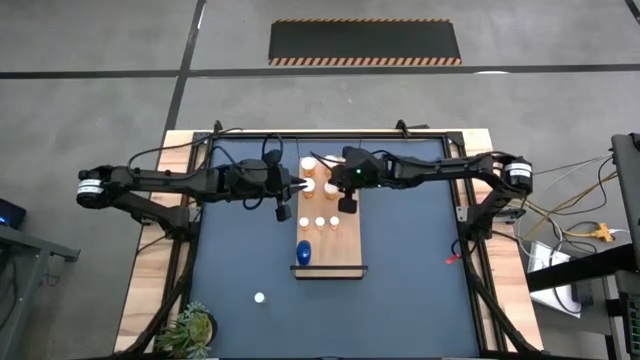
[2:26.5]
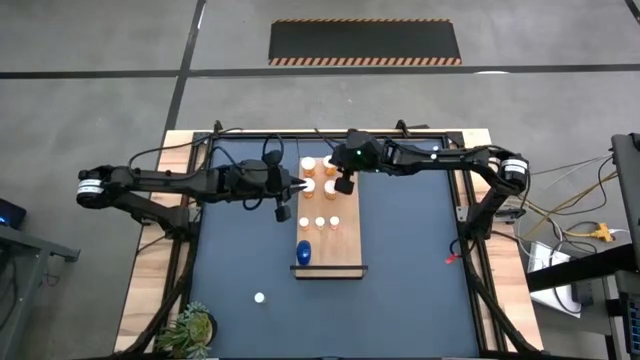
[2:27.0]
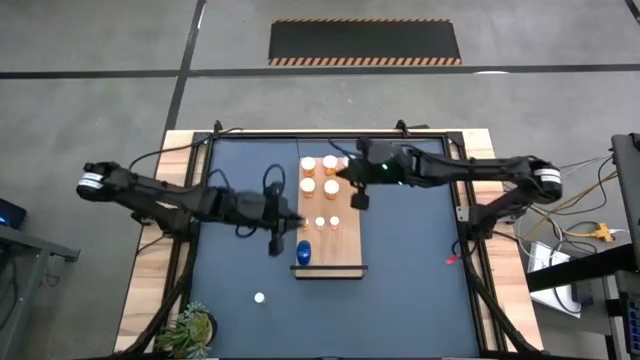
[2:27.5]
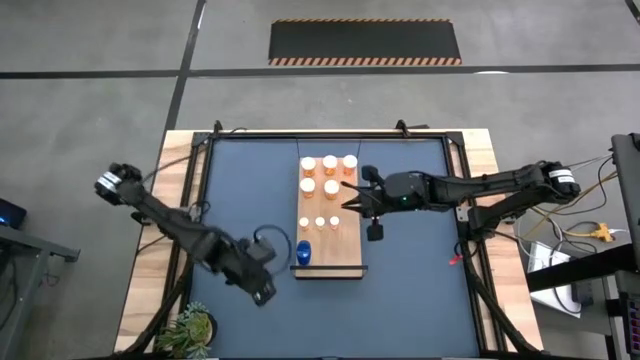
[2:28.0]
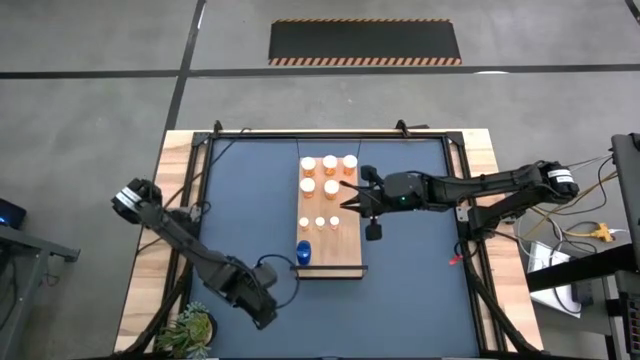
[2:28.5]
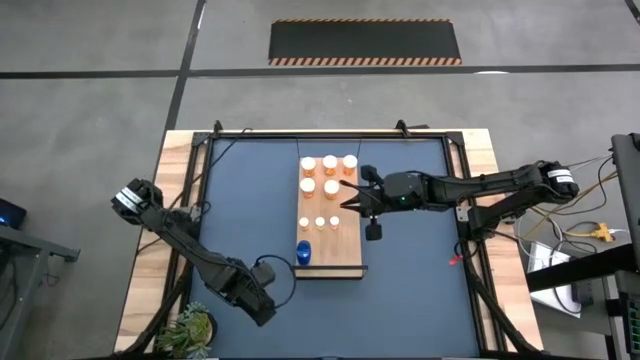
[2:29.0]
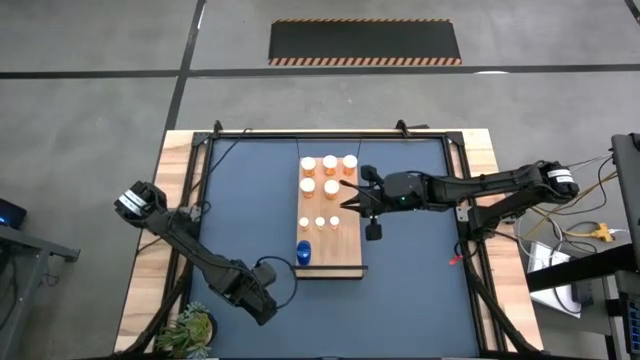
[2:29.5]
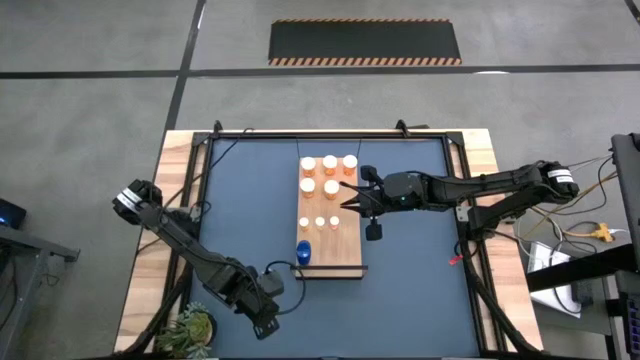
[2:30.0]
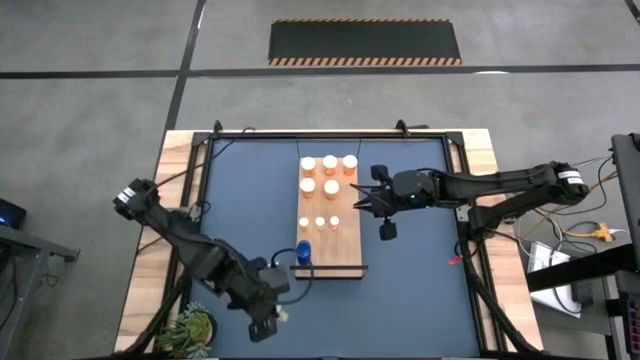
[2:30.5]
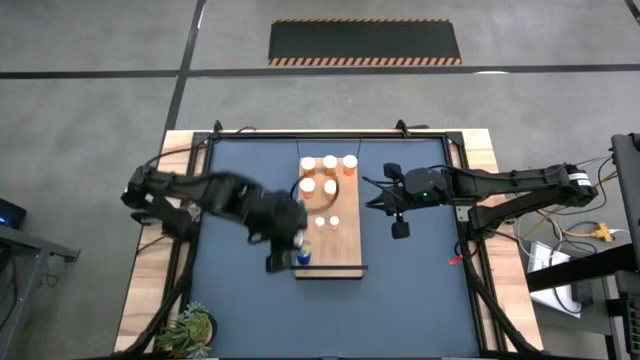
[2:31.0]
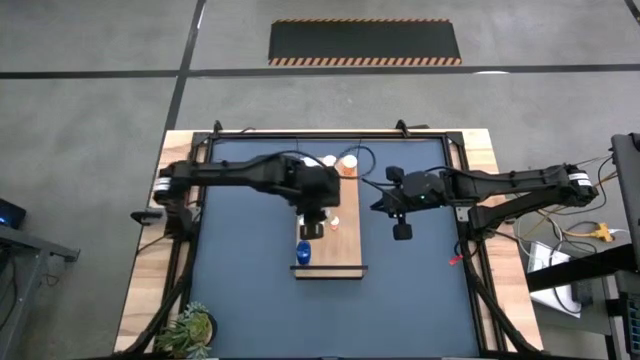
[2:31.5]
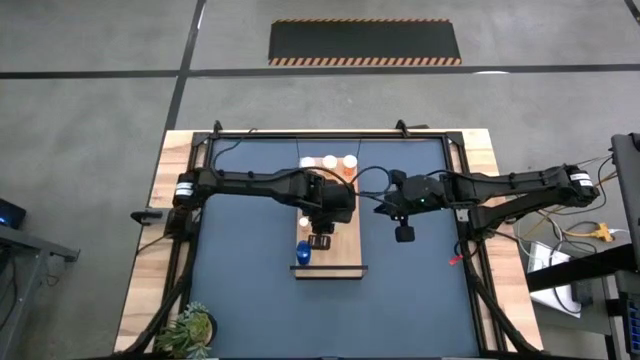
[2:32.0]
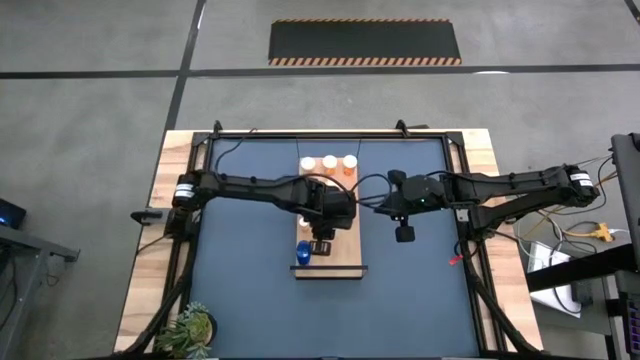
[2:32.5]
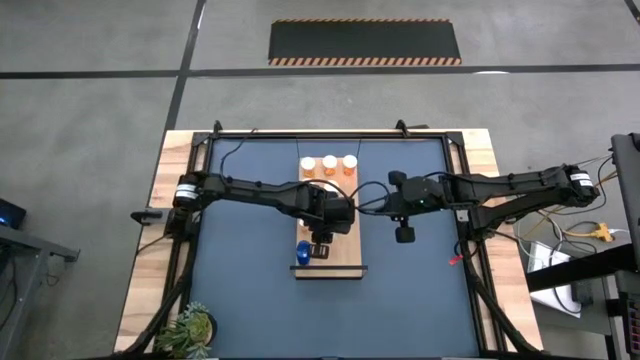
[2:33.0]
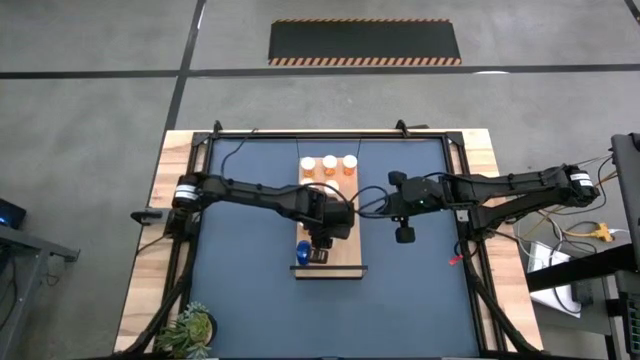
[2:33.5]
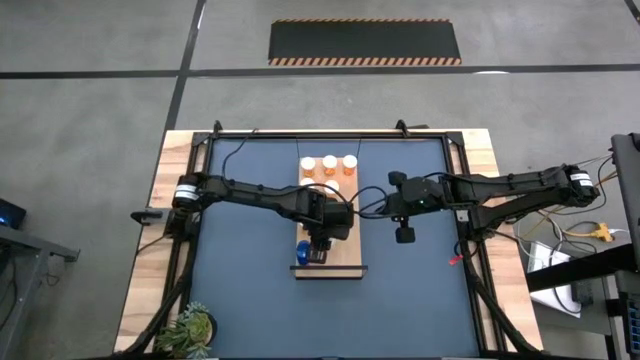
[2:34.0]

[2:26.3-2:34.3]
Task: Pick and place medicine bottles onto shelf by color
Put the small yellow pill bottle on the shelf

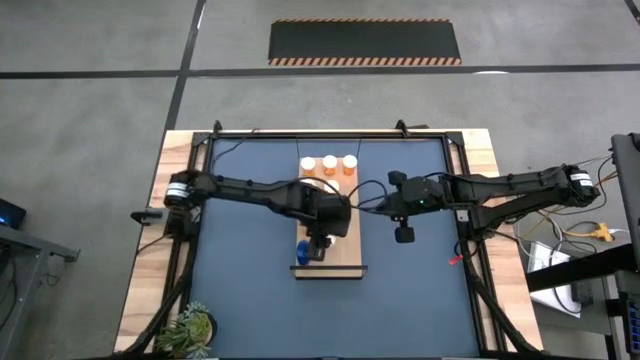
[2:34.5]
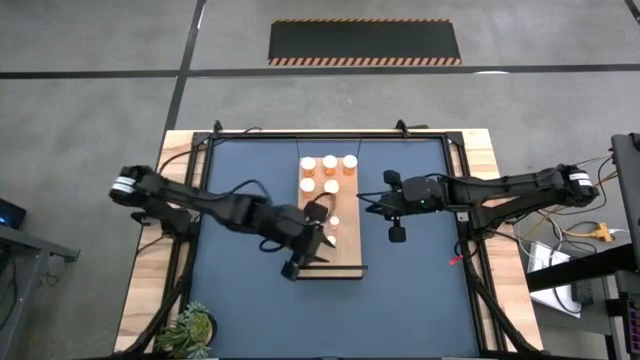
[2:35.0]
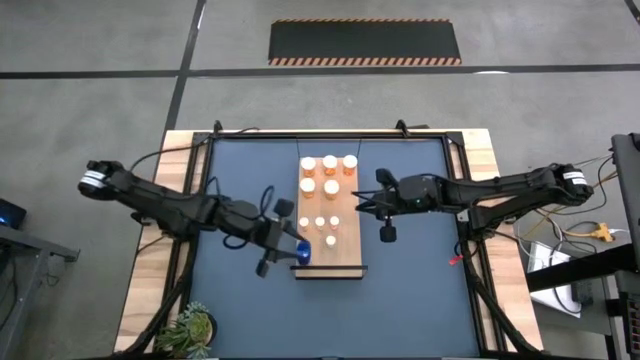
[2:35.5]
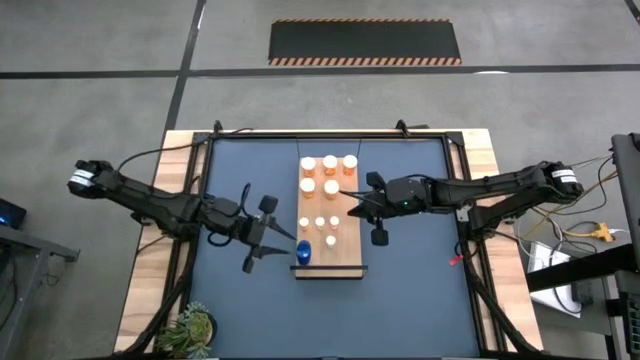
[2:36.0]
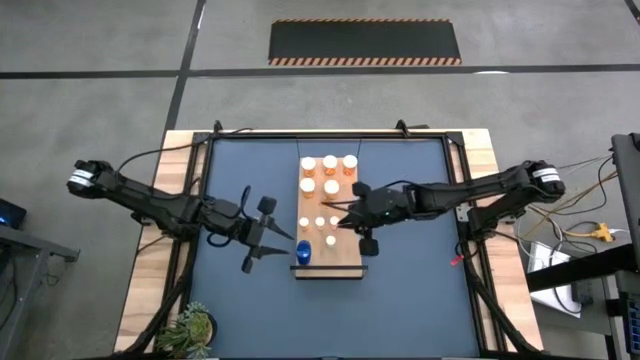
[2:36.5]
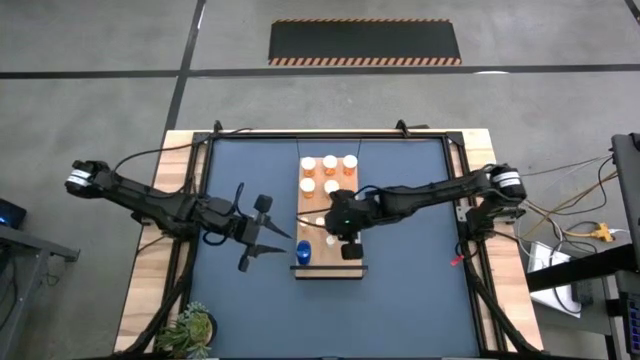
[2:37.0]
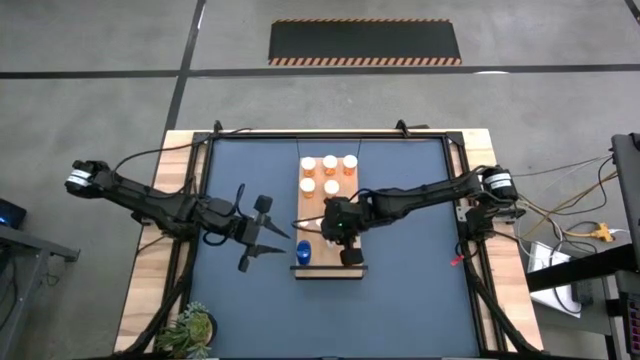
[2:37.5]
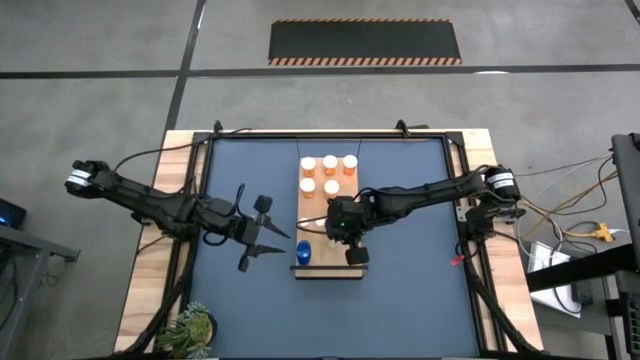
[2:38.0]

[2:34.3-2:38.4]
Put the small yellow pill bottle on the shelf

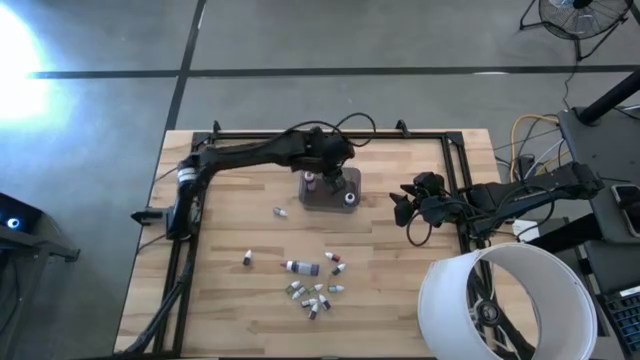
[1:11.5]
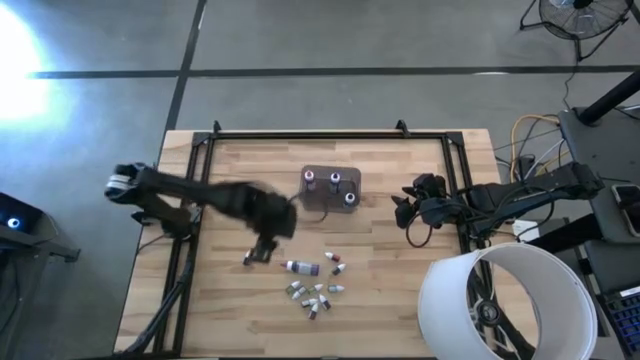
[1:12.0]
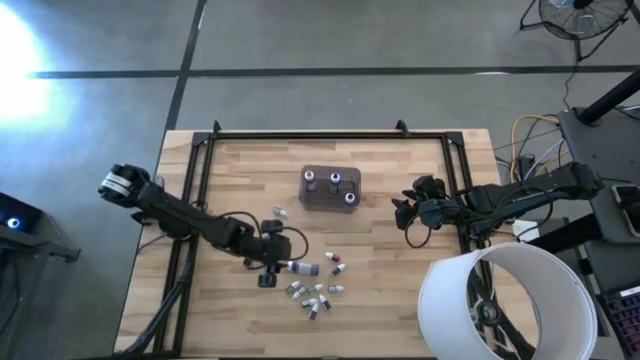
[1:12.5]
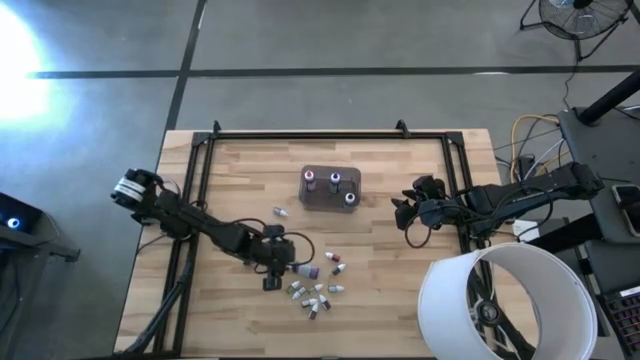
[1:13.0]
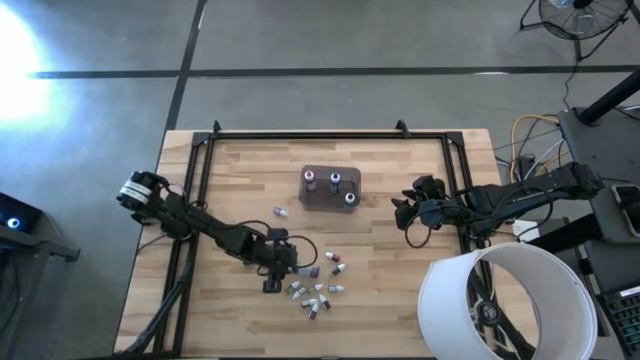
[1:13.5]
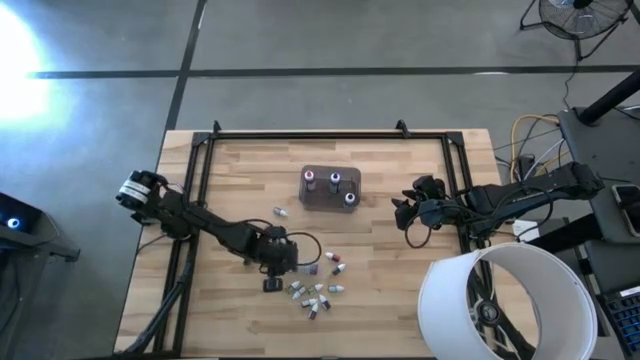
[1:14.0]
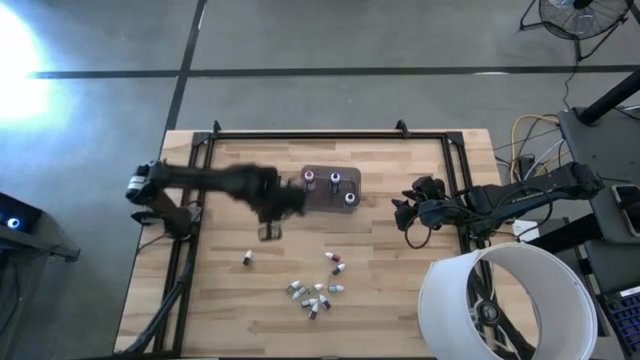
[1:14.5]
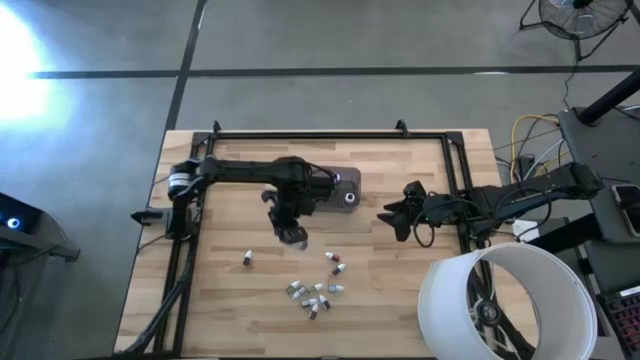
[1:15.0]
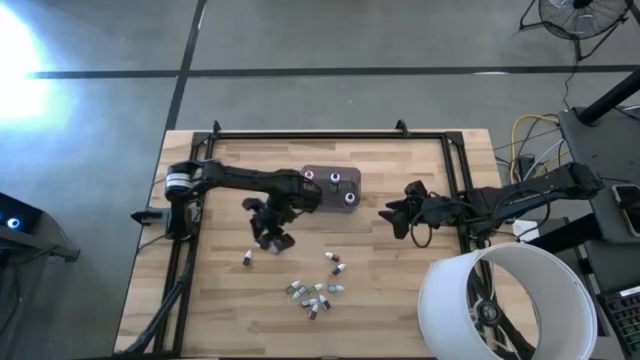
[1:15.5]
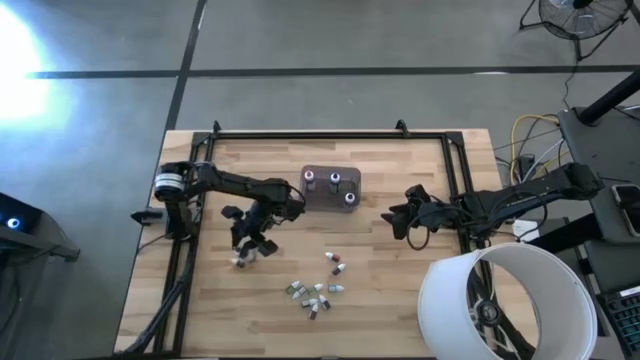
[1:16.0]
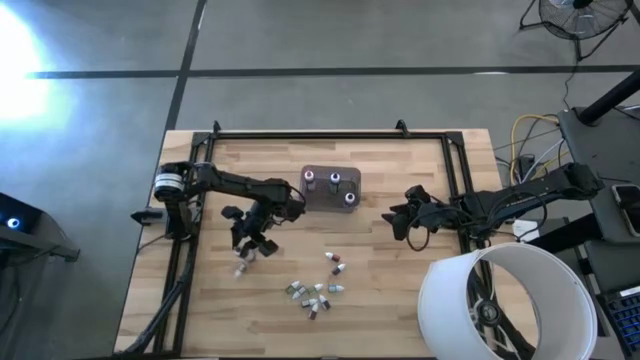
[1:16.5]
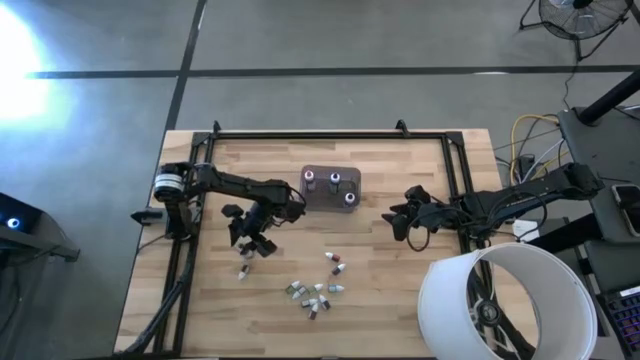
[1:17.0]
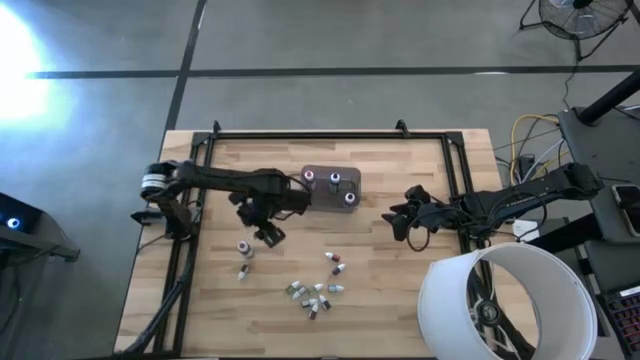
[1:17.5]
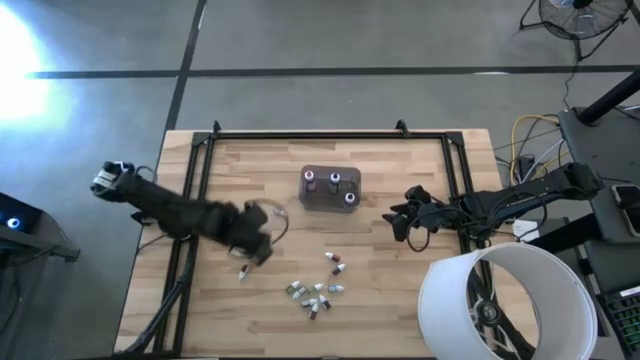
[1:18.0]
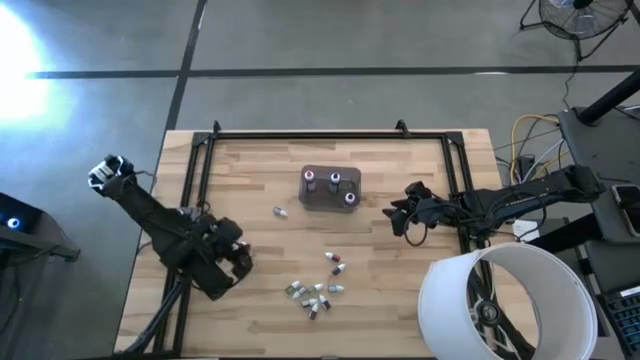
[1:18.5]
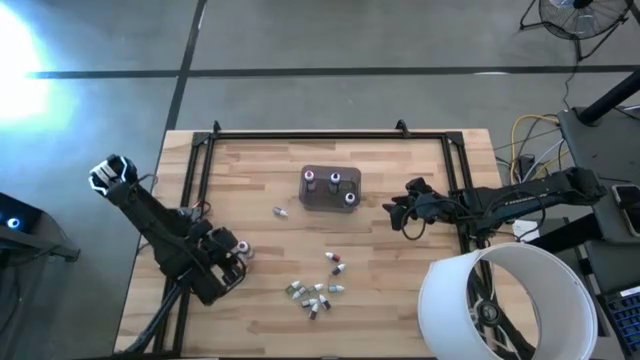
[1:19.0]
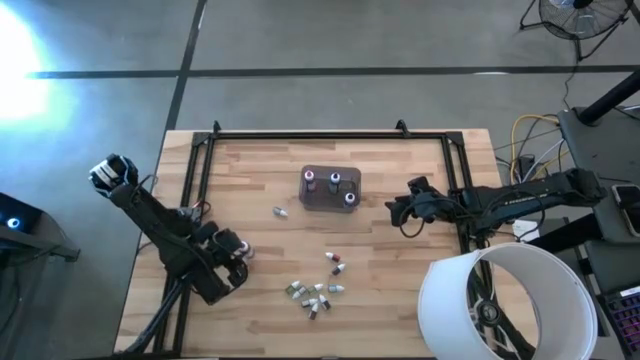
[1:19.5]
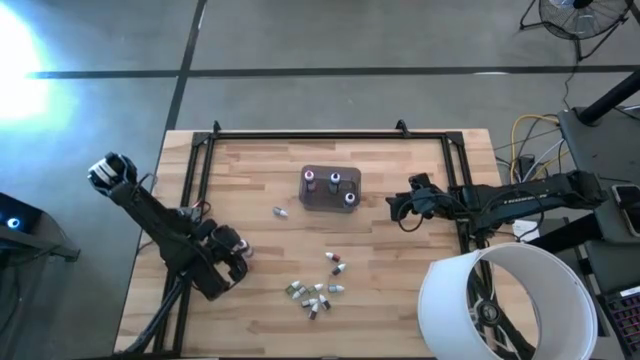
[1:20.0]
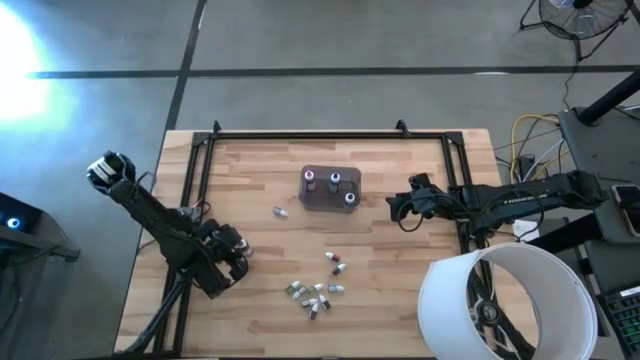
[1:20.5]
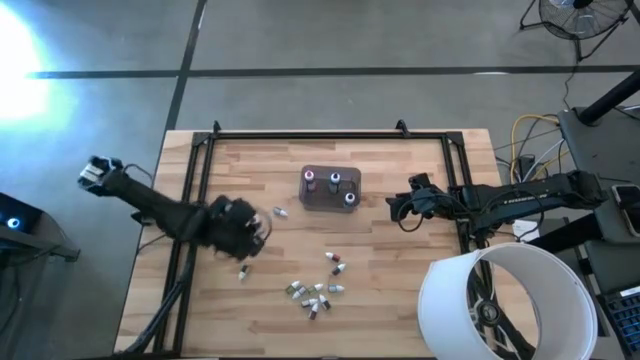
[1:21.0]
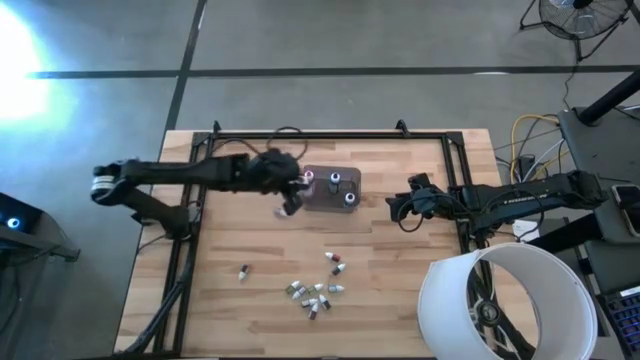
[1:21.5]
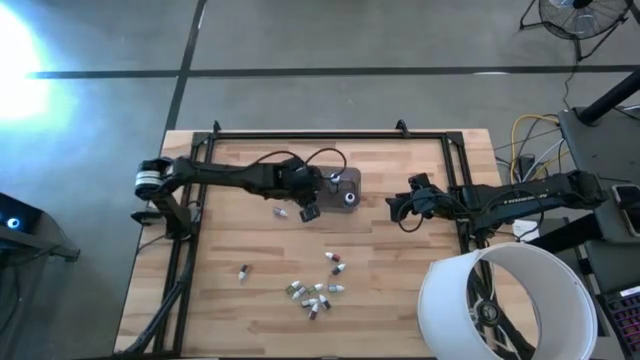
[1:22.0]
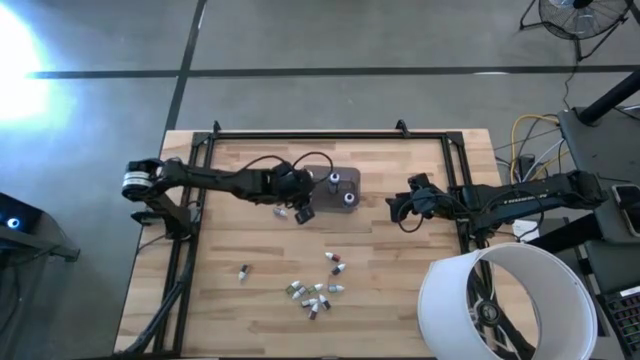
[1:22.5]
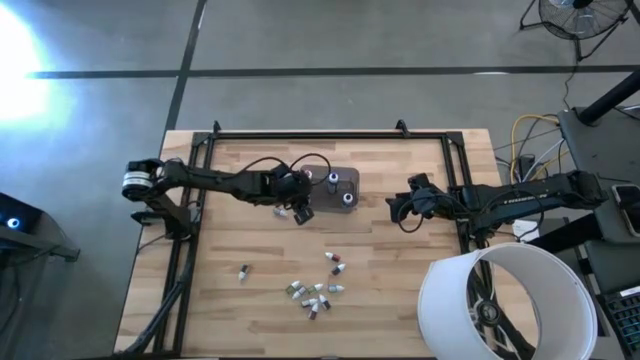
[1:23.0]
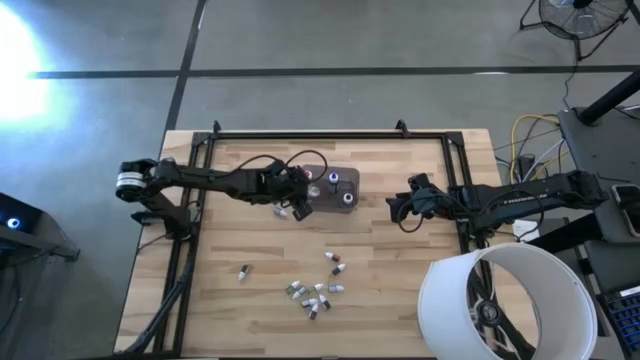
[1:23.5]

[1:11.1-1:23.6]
Task: Pick & Place food coloring
Put the large violet food coloring bottle into the black bin
